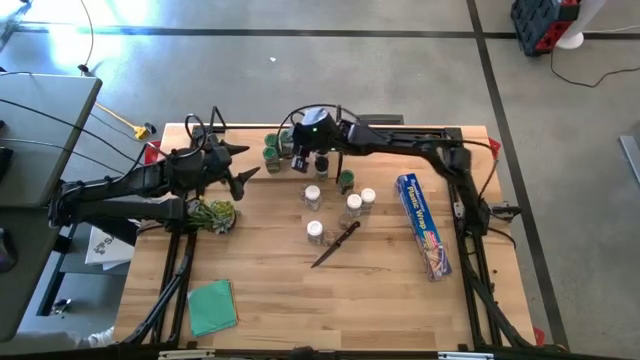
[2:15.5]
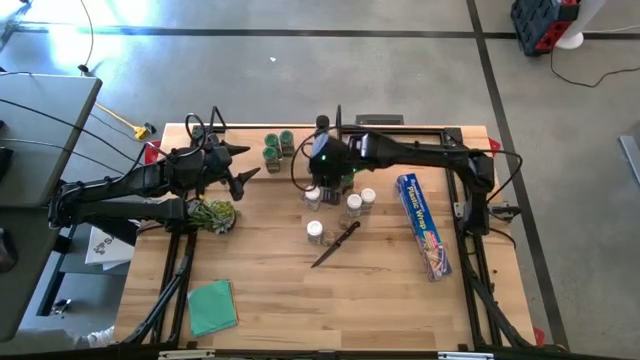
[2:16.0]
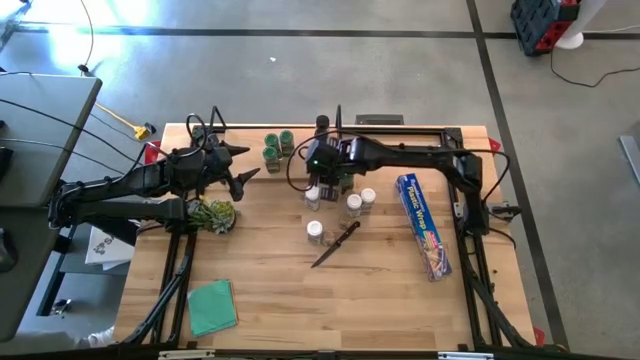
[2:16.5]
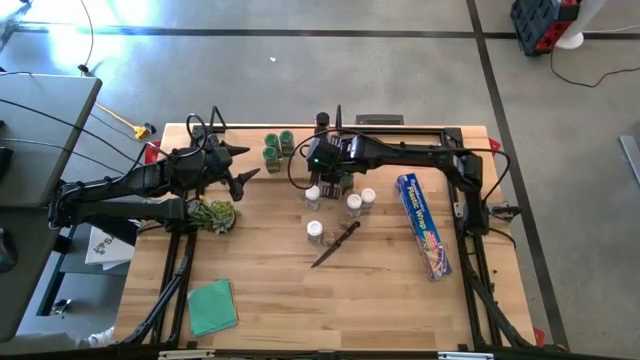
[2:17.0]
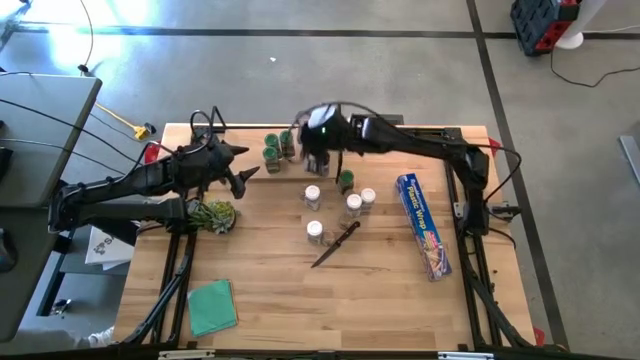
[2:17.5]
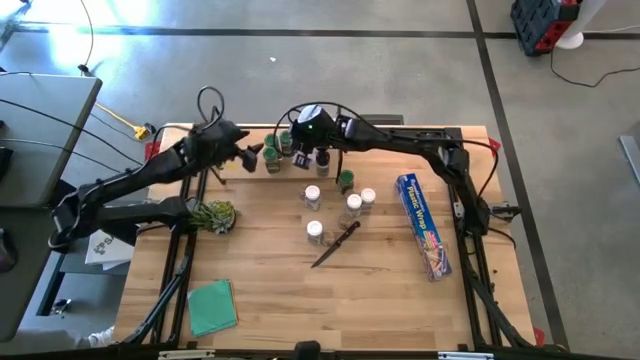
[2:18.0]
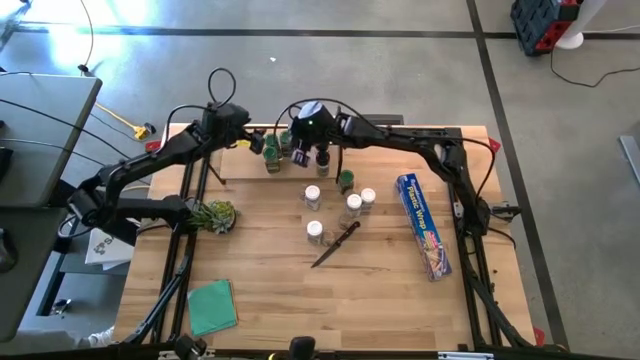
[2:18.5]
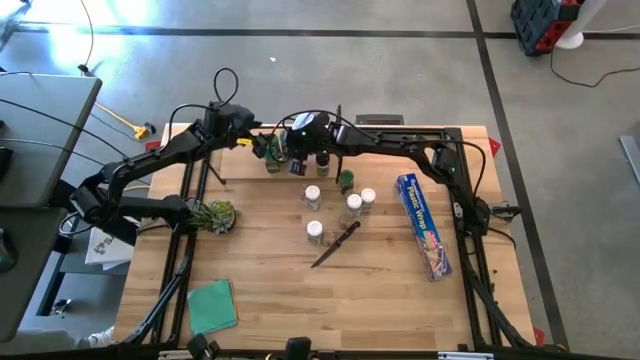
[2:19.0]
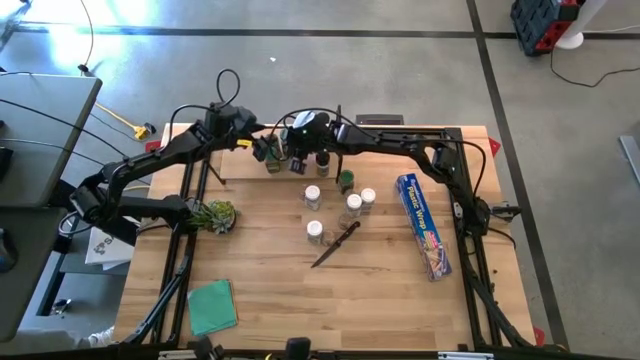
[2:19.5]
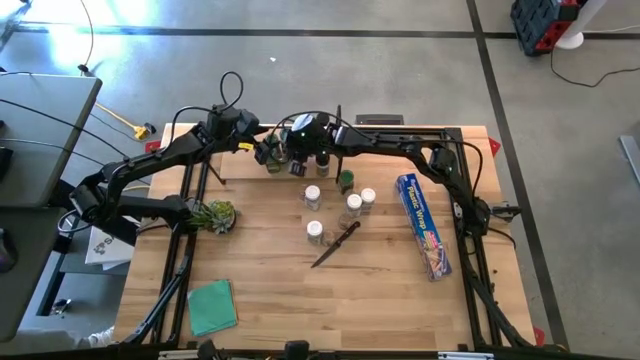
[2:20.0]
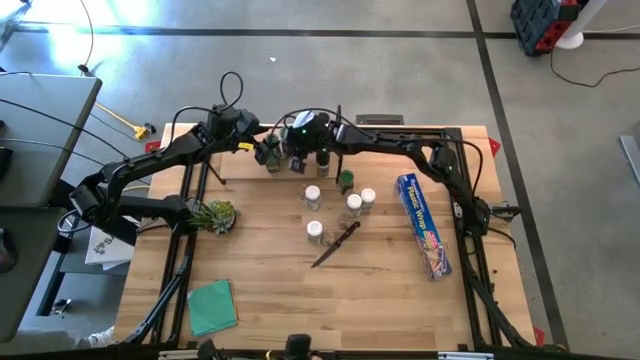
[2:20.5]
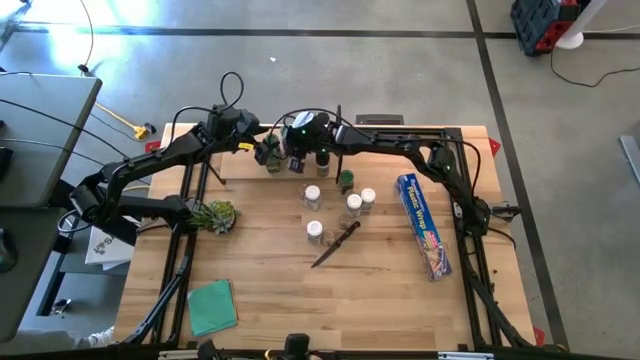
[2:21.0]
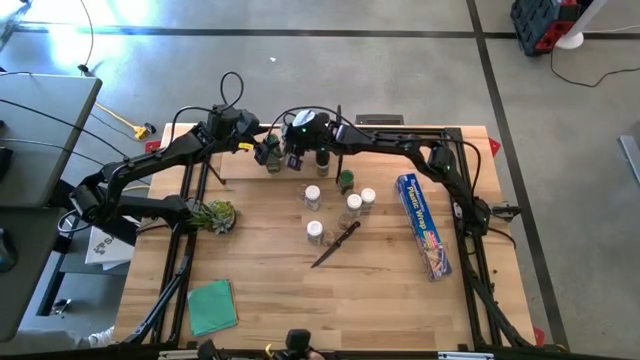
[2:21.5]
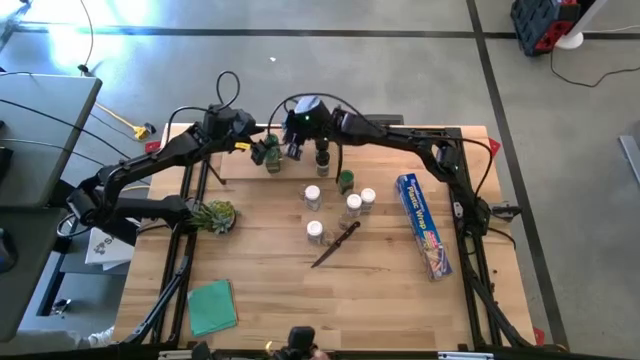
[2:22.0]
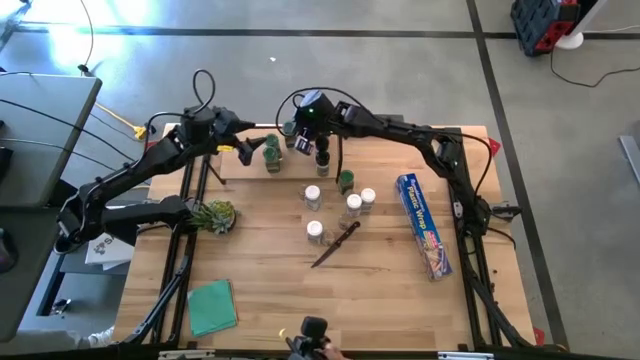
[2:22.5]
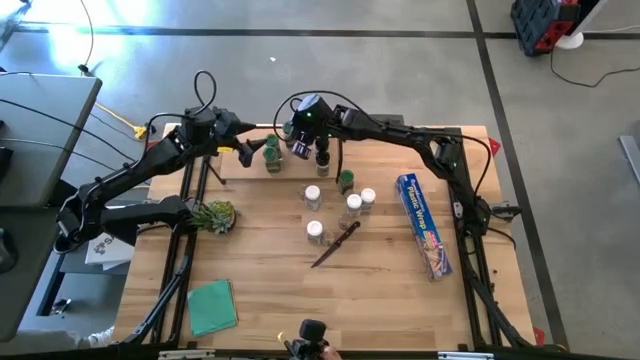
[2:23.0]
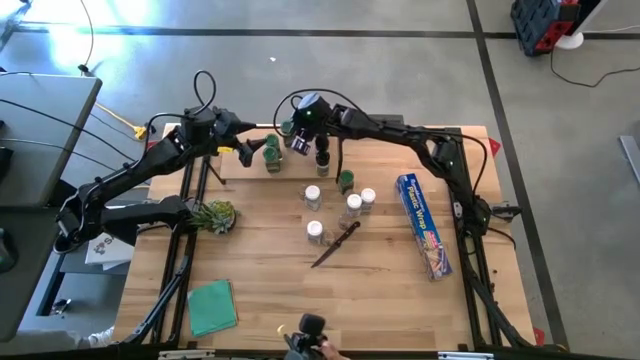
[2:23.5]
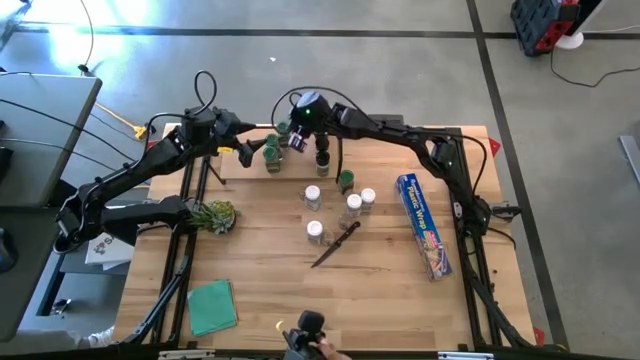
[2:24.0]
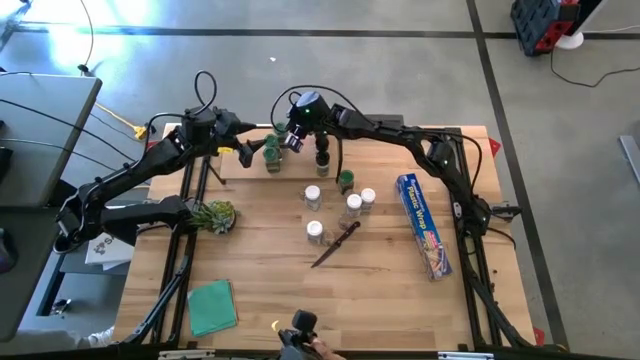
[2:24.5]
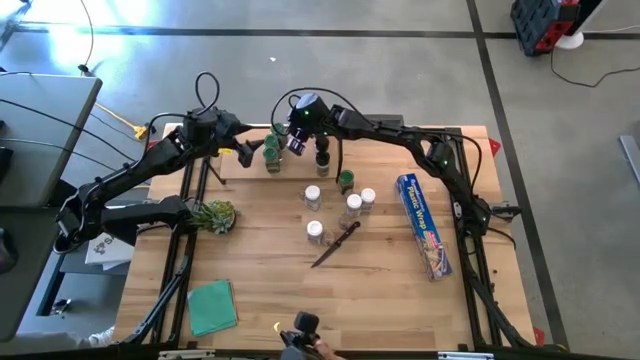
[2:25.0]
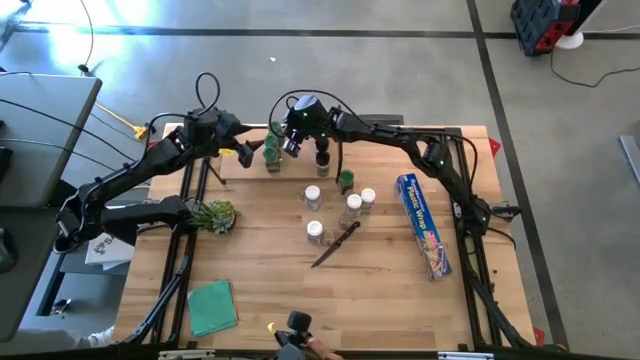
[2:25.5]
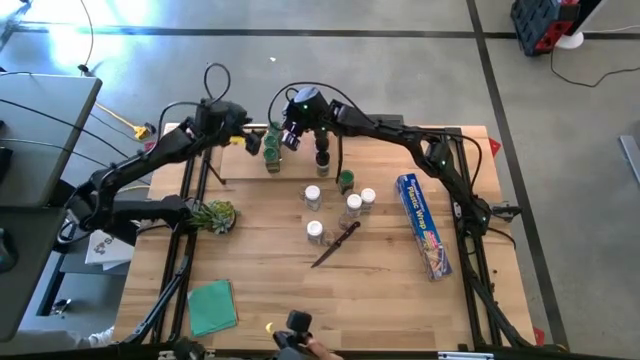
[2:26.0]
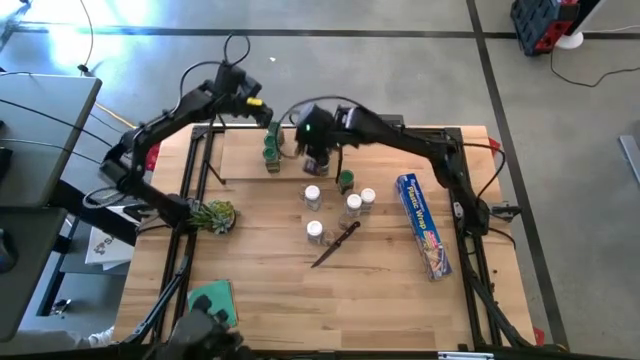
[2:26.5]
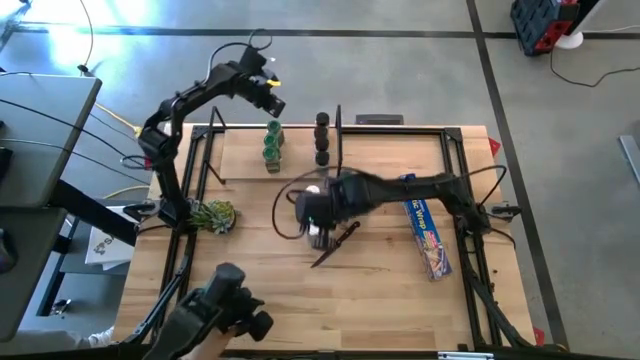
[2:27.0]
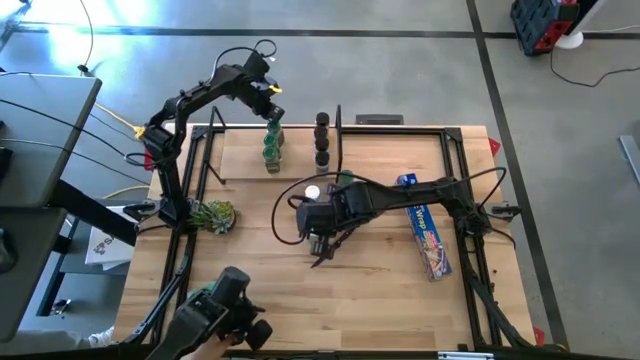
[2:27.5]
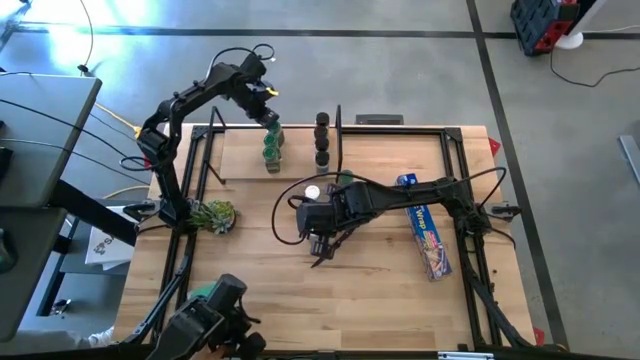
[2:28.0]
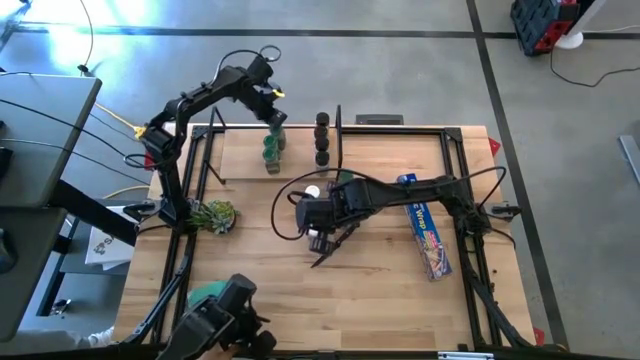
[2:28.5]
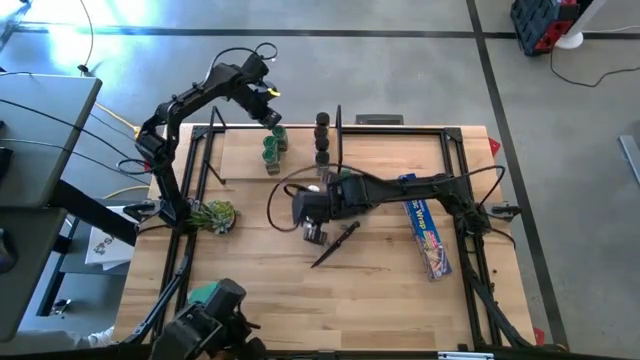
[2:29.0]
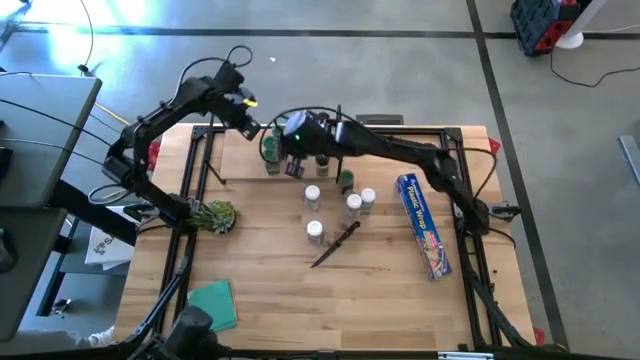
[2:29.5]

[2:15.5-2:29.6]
Task: Shelf spices
Adjust the black and green lid seasoning bottles on the shelf
